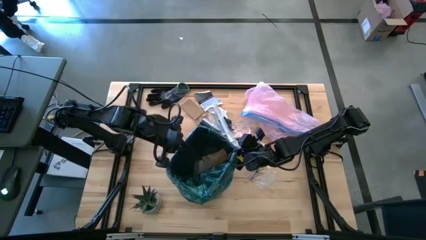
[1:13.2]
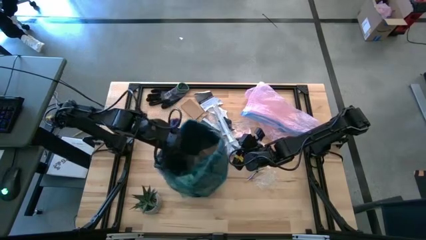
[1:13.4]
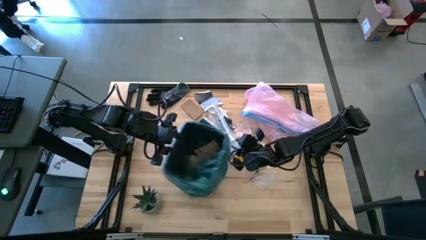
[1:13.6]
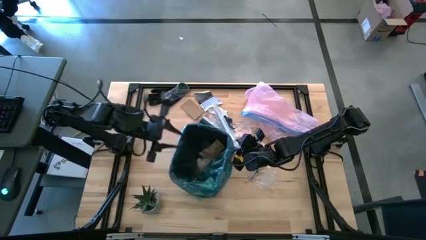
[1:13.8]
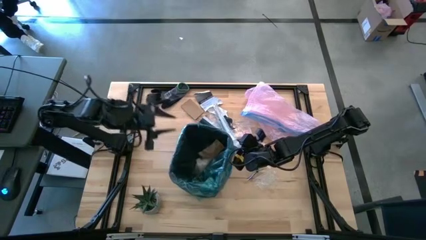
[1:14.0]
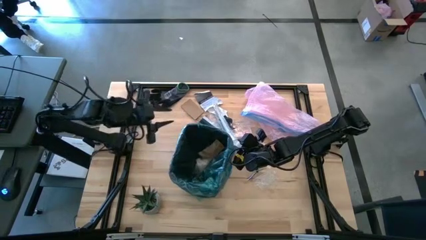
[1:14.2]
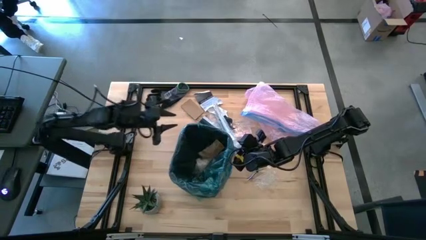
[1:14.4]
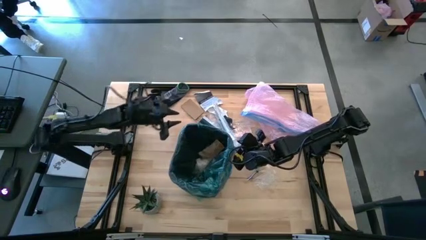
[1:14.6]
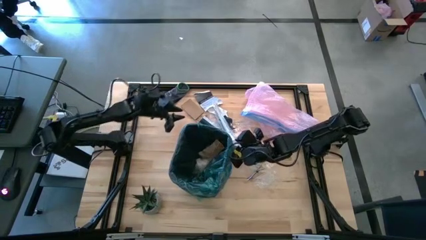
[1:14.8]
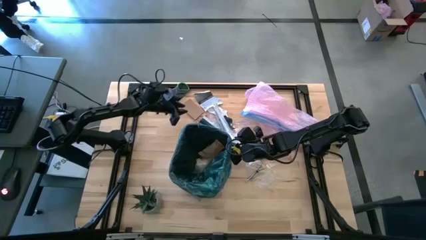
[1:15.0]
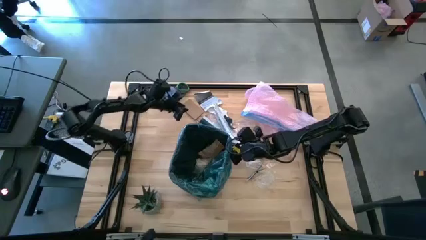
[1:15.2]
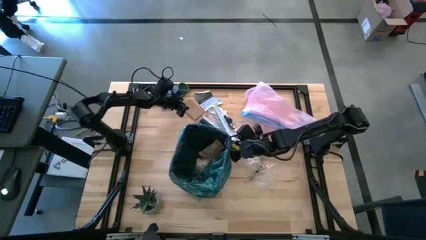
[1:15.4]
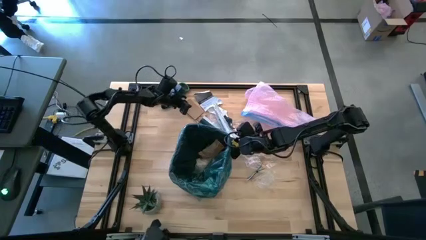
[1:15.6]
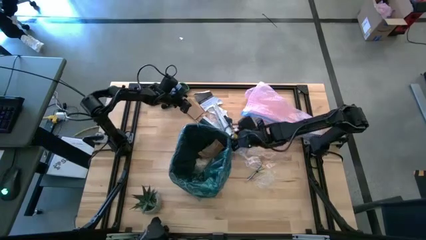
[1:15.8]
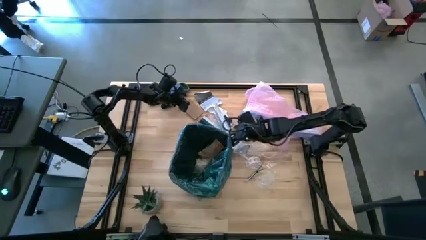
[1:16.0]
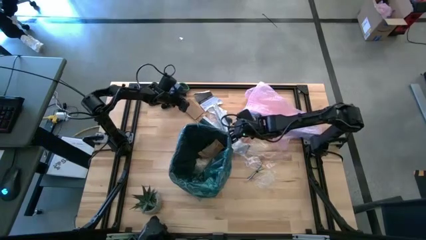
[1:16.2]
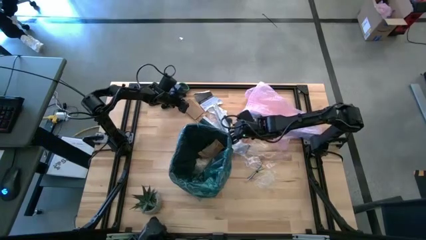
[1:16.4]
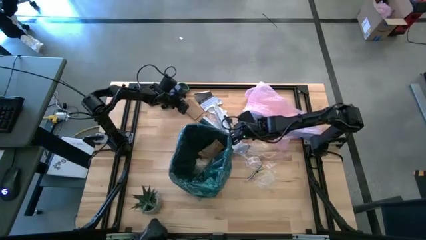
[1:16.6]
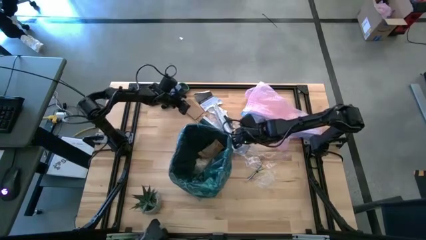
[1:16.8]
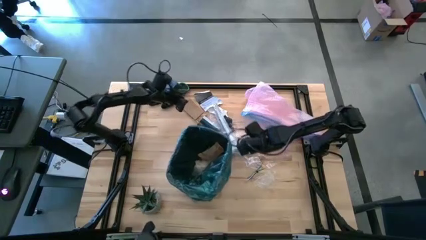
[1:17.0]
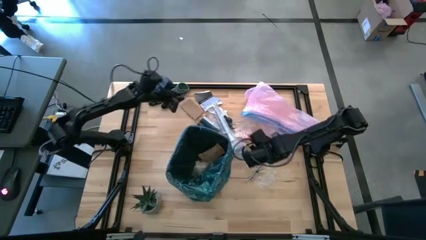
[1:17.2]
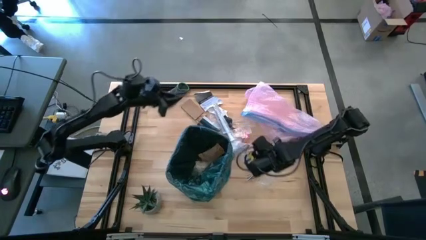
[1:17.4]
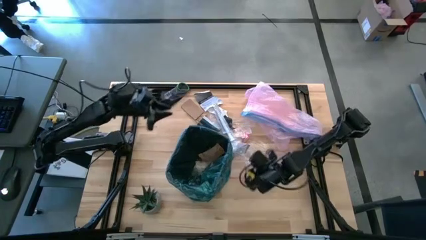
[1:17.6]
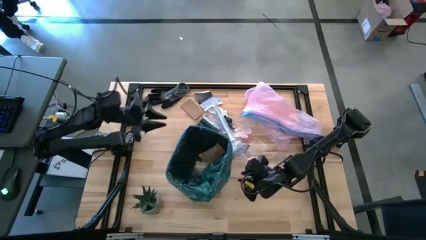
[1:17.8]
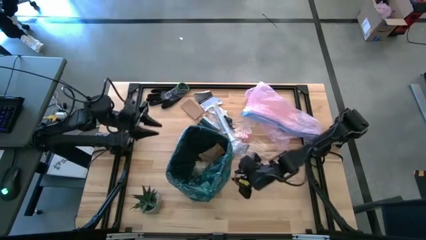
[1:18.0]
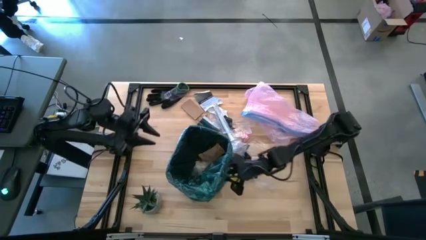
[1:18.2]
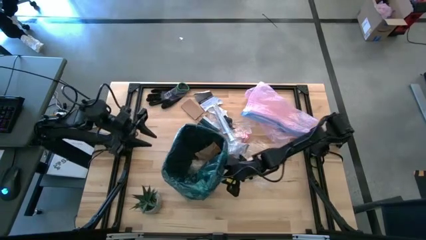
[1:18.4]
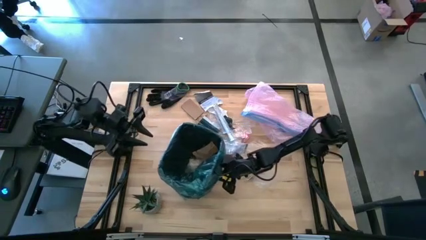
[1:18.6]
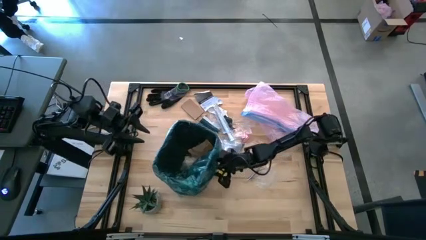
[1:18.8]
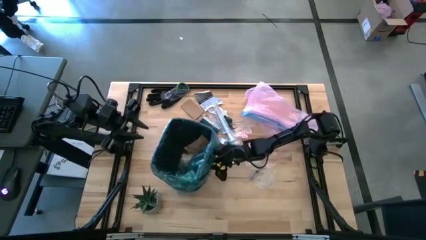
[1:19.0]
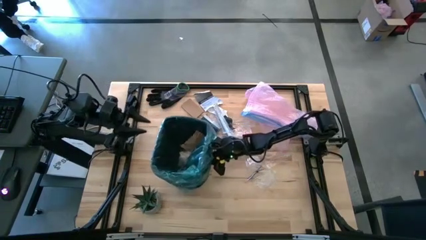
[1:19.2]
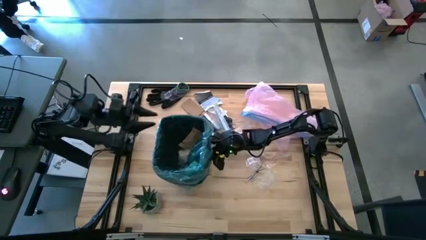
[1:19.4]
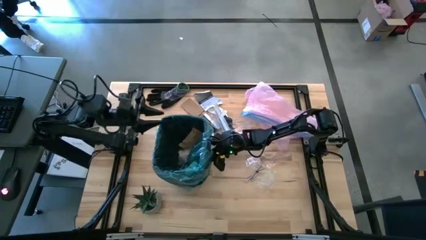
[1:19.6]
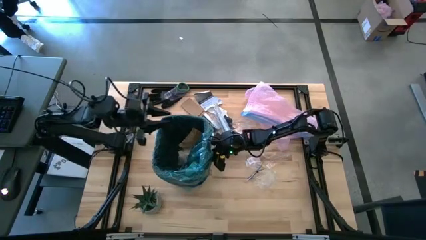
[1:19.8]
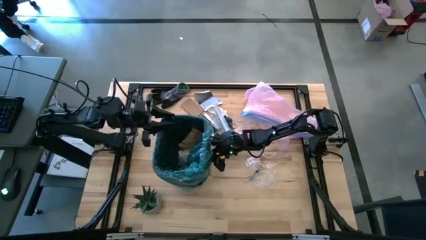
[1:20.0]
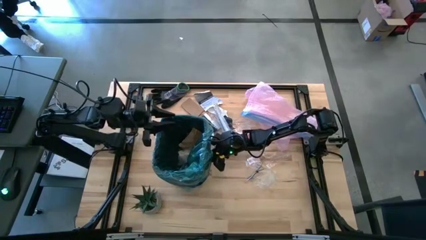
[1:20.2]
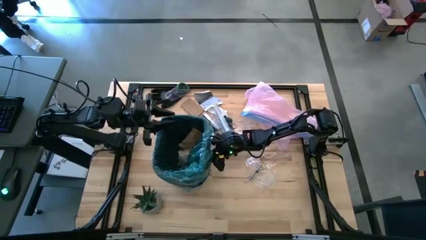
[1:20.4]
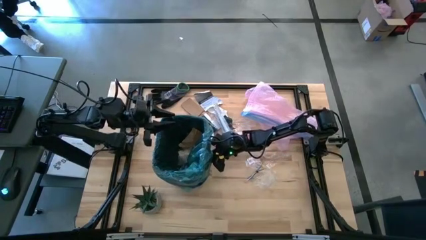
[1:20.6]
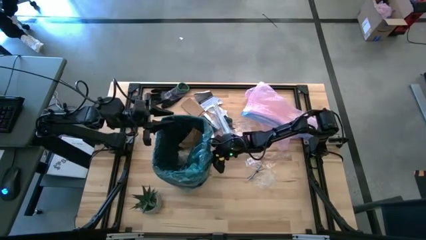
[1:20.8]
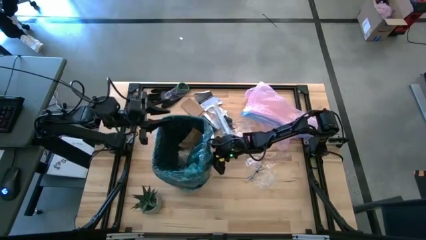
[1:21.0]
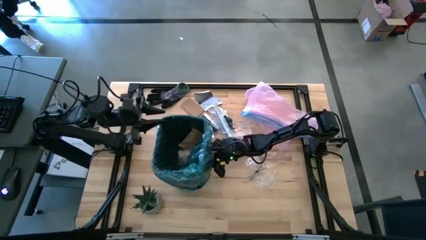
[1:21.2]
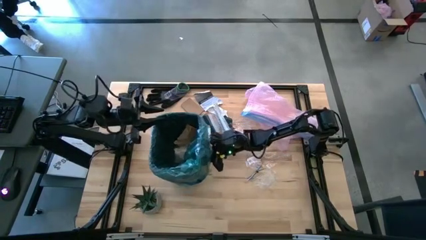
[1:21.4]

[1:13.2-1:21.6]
Task: place trash/remove bag and relplace
Adjust the trash bin

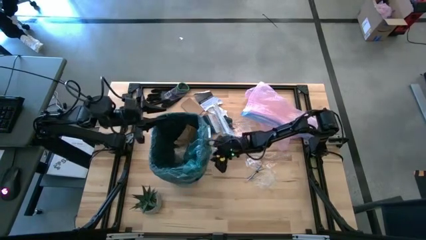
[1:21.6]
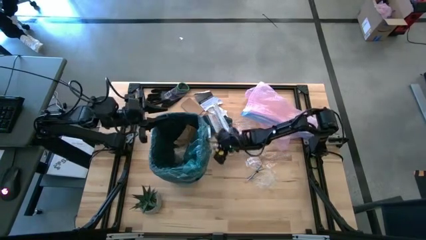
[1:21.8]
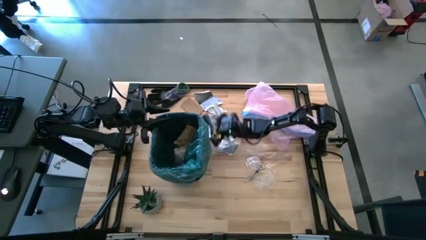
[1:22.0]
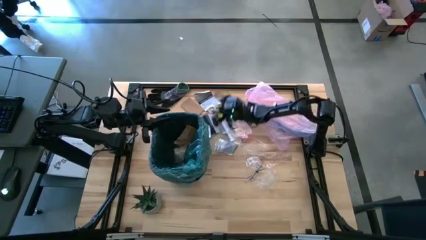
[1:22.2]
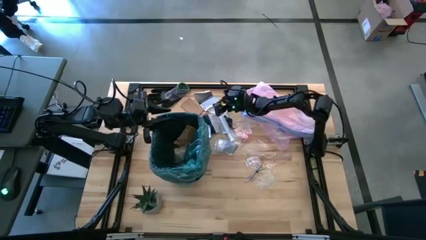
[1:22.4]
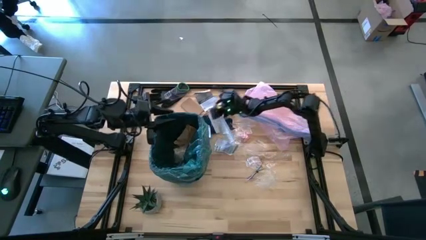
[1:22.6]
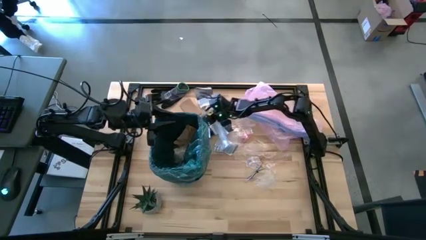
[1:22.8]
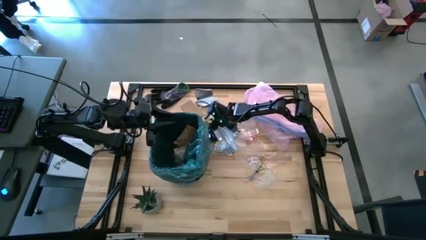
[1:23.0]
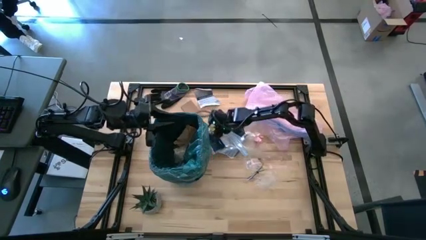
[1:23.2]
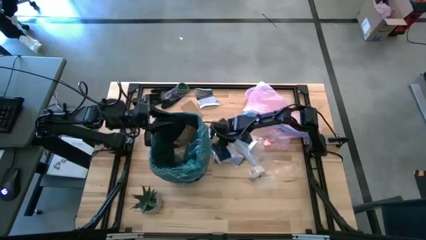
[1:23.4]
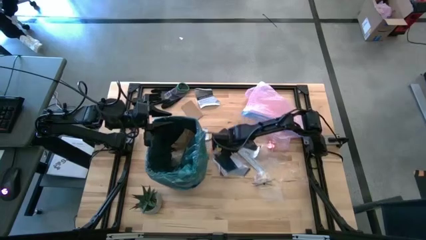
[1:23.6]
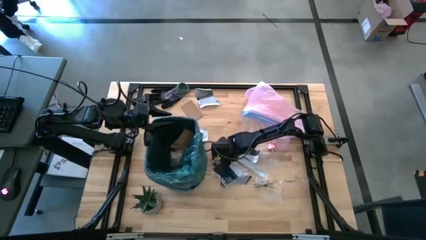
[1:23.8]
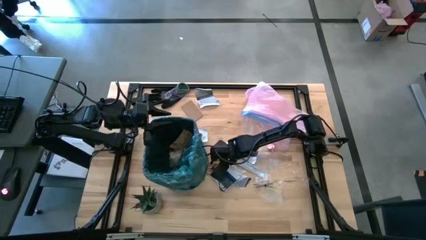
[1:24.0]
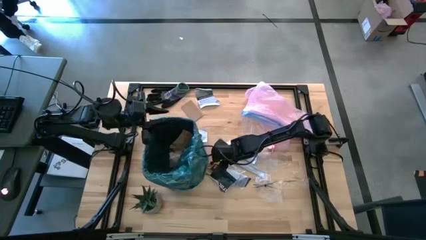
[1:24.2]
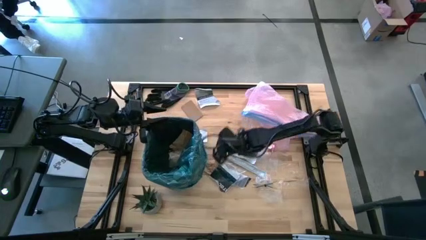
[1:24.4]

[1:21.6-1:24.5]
Move the trash closer to the center

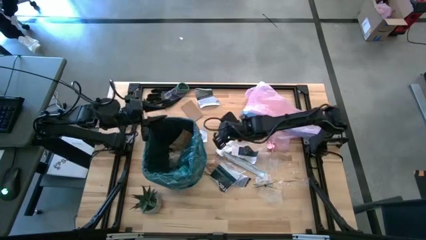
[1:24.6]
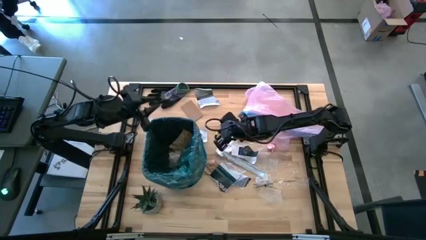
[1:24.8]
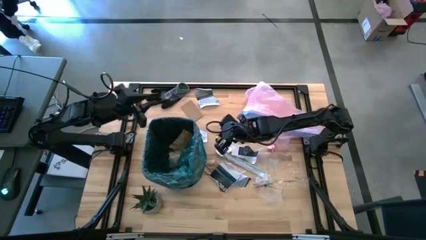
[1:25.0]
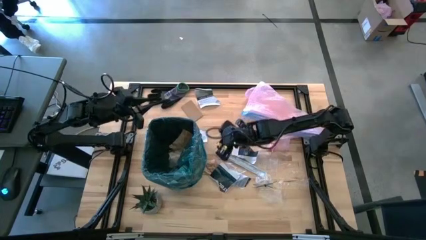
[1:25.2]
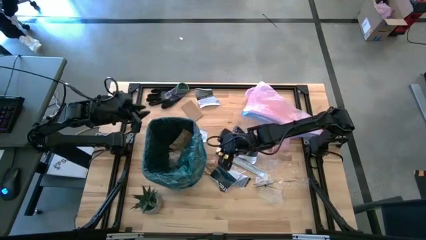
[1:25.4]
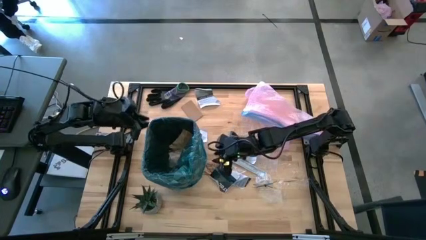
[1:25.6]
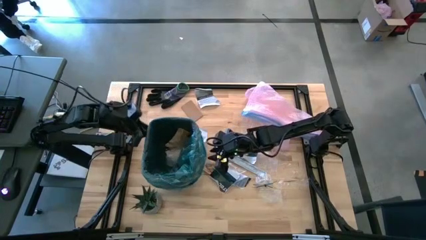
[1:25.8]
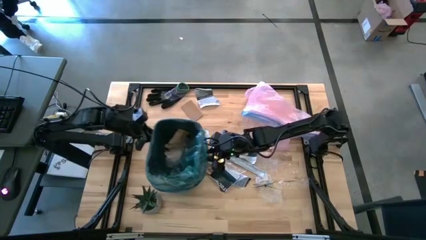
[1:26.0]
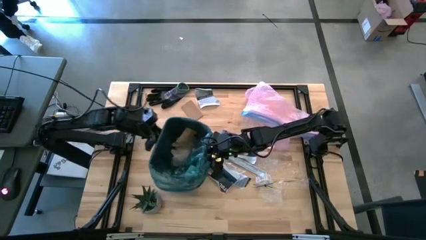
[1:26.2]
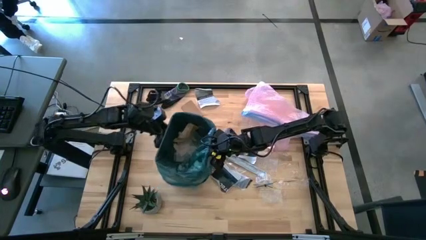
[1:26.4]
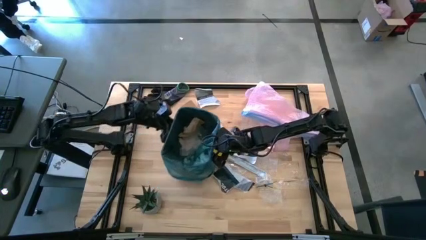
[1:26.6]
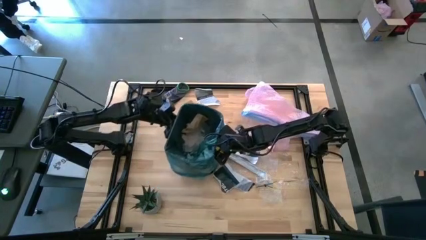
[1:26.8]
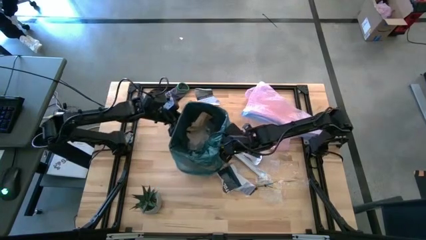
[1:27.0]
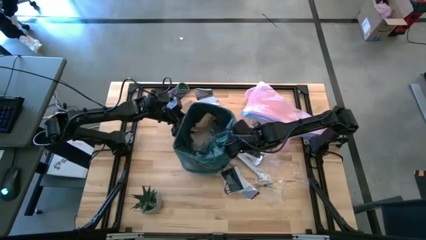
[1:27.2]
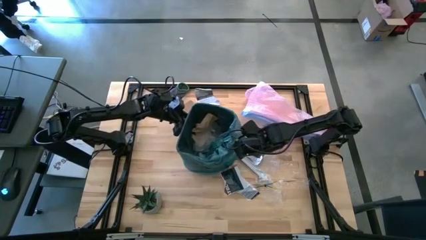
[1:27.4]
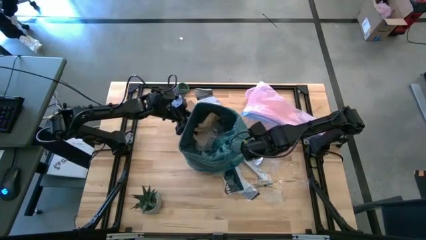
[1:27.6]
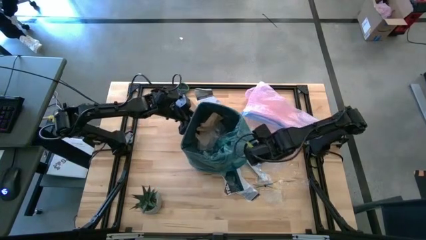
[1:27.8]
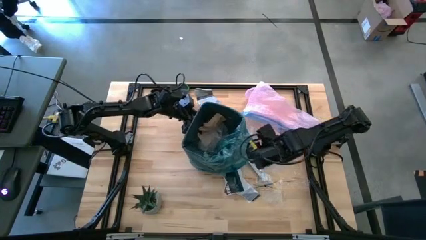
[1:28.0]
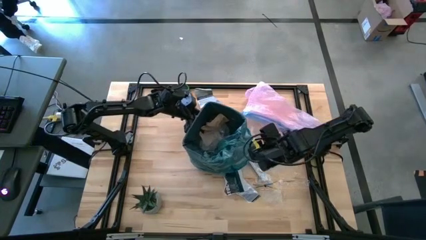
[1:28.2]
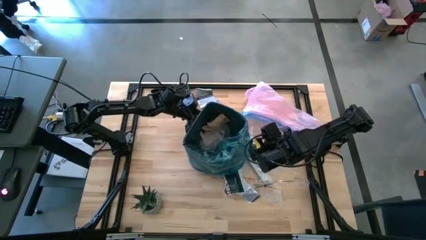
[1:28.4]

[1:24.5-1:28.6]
Adjust the trash bin
